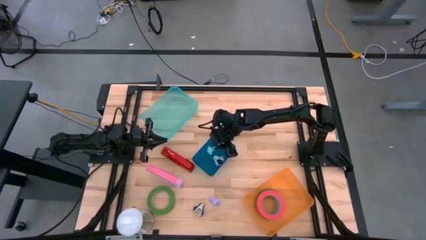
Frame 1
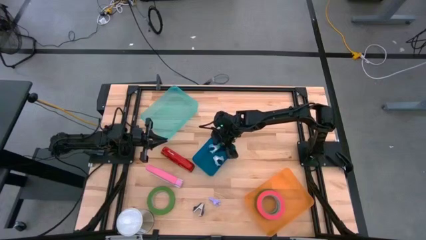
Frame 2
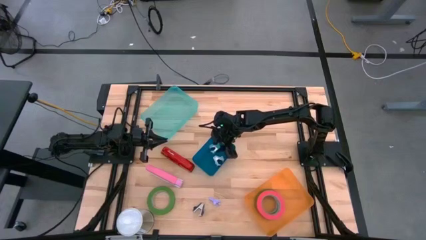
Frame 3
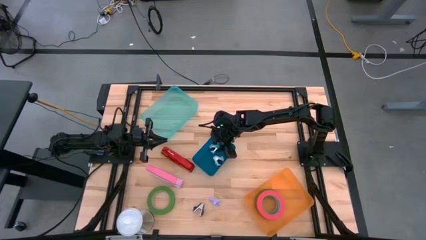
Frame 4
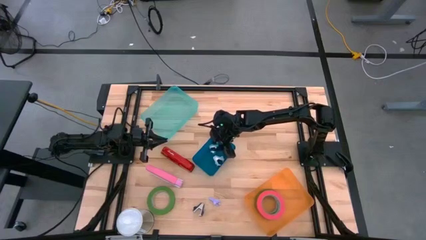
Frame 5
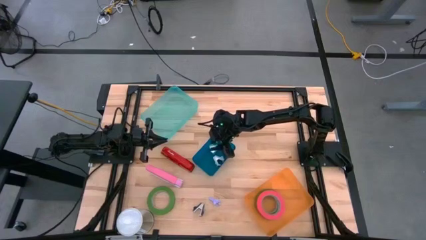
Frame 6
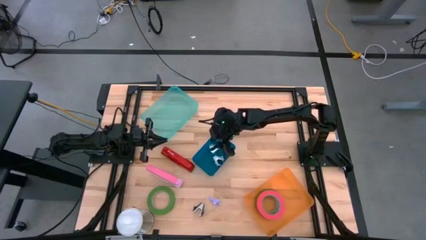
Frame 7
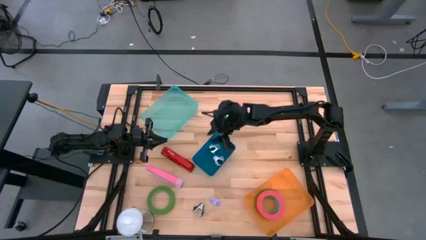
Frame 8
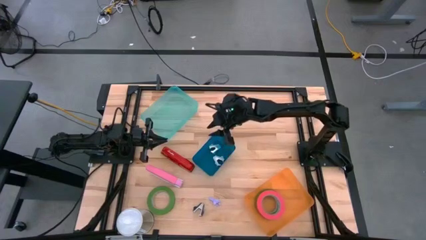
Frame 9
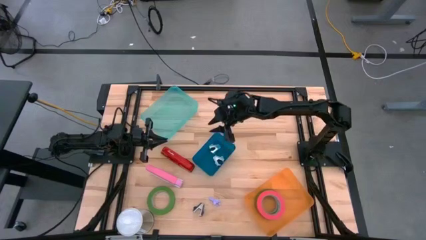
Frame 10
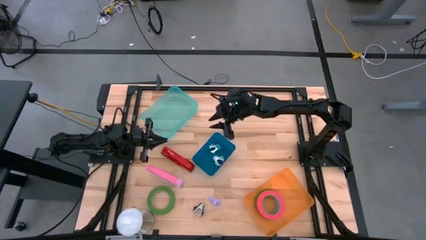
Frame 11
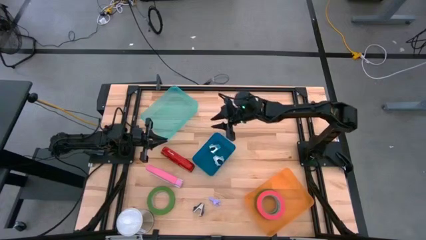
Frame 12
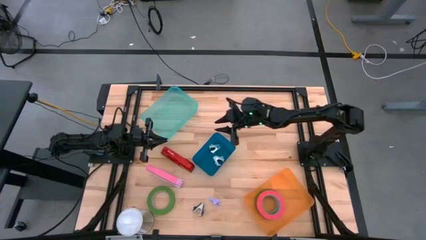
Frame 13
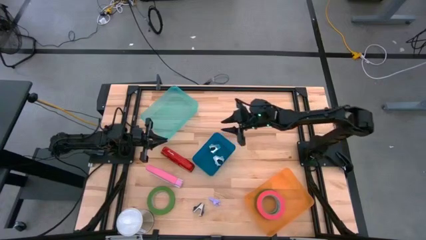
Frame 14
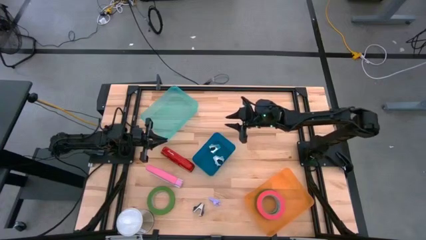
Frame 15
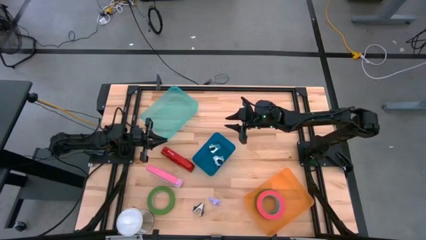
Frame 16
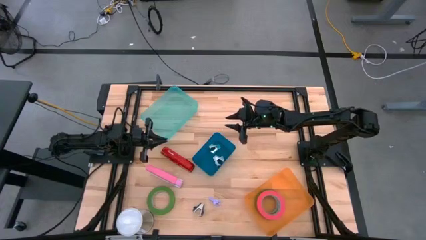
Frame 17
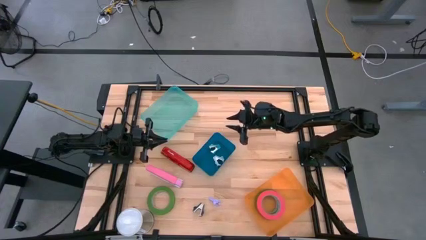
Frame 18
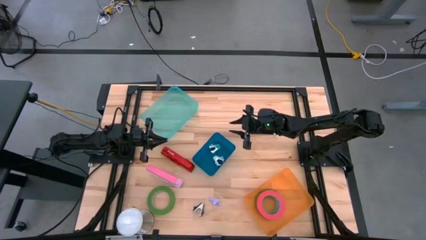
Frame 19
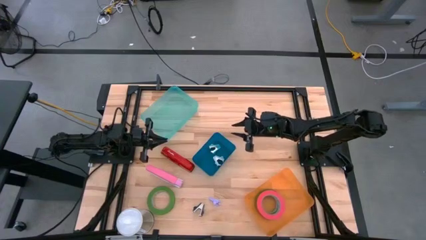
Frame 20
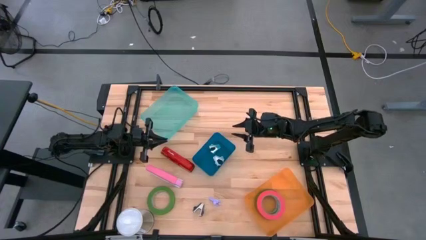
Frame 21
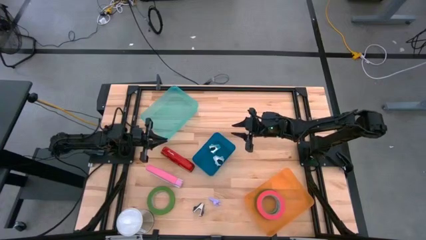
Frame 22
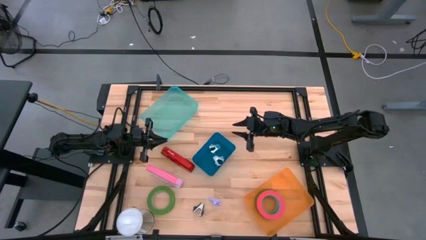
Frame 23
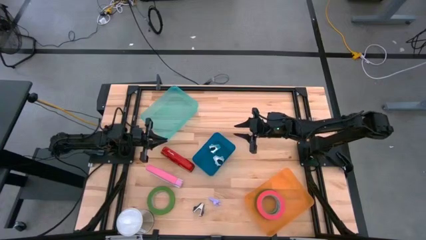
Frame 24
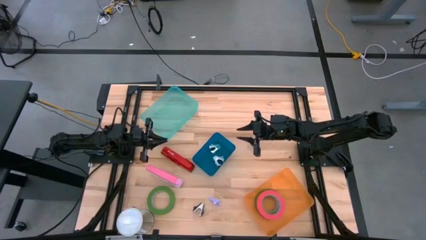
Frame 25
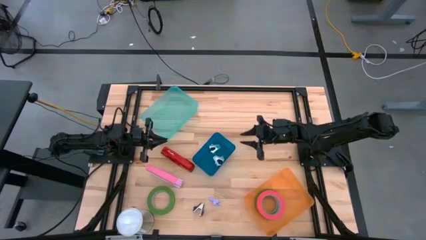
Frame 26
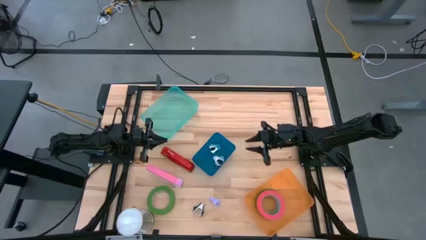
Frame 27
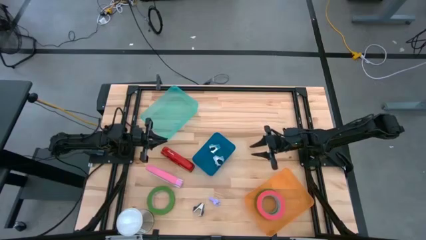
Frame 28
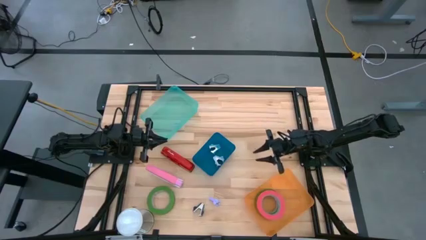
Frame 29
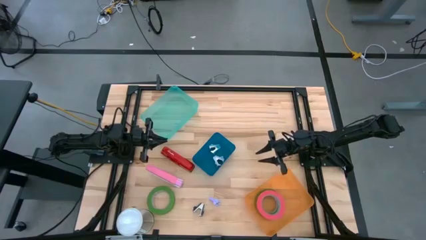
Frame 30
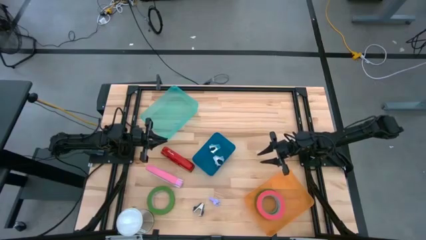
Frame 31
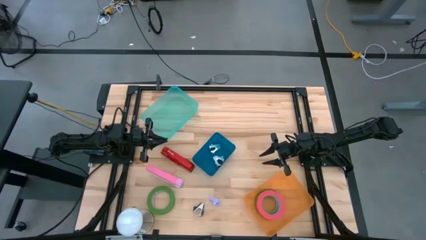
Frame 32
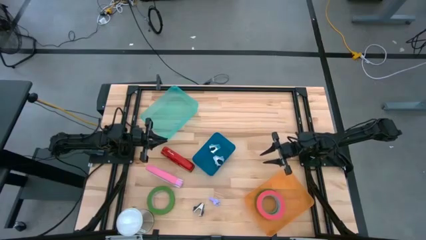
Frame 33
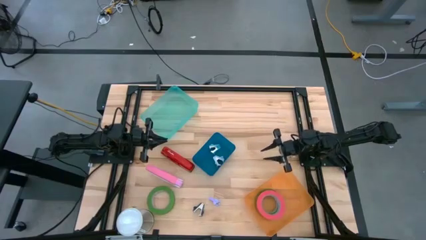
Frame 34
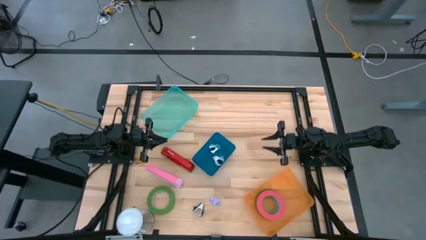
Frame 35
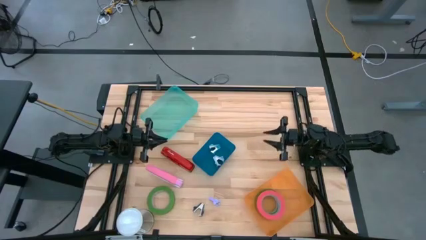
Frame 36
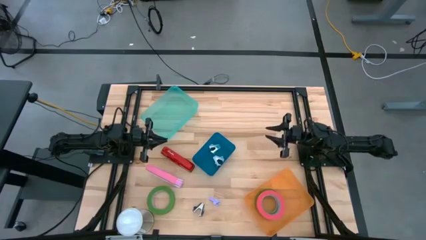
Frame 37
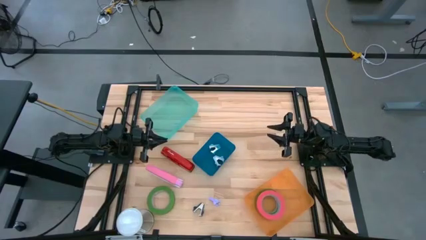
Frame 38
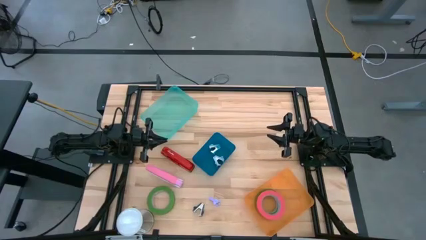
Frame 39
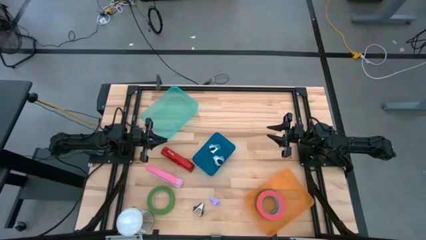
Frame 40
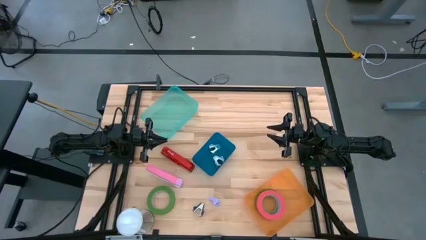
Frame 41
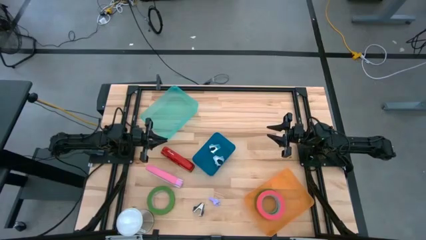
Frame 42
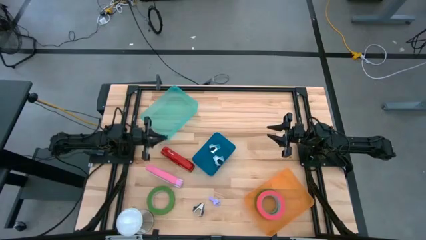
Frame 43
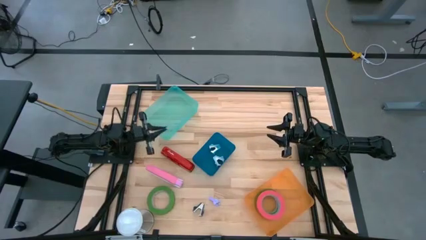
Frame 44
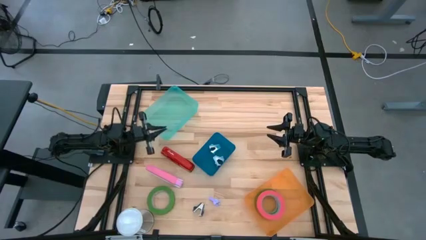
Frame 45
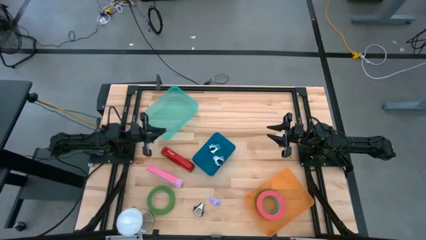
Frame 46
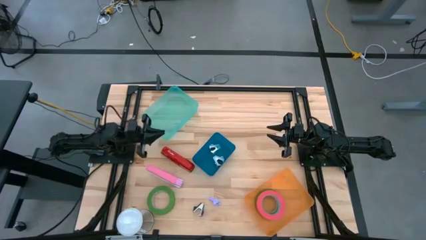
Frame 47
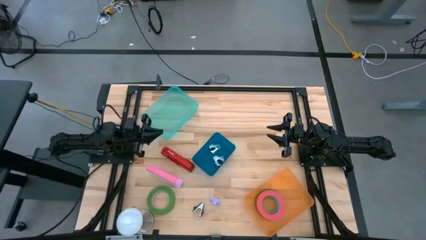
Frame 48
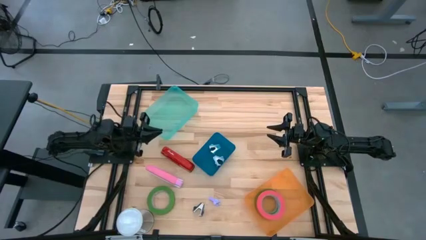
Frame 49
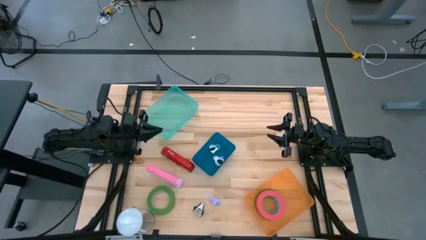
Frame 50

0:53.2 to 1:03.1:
Task: Pick and place Stapler, Stapler remover, tape
Put the red stapler into the green bin

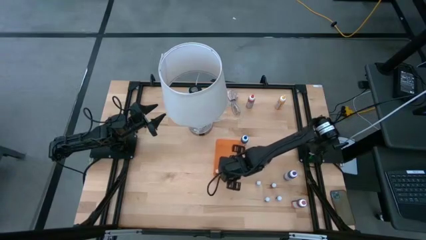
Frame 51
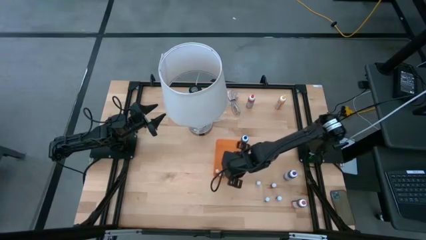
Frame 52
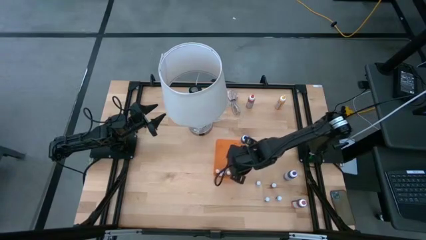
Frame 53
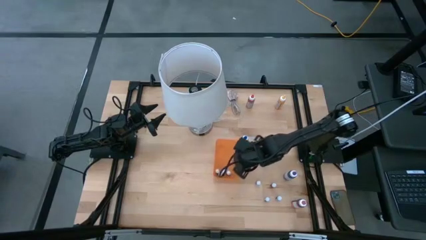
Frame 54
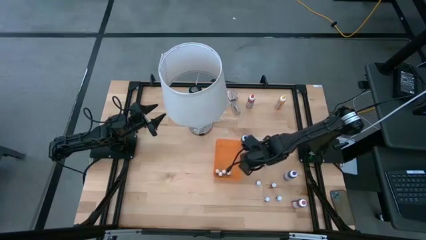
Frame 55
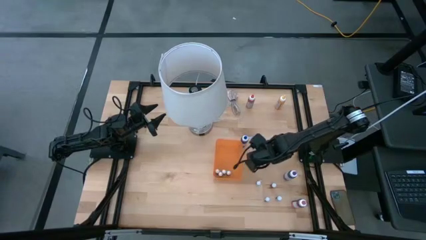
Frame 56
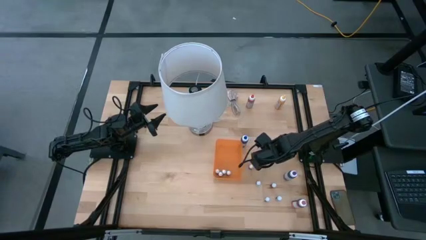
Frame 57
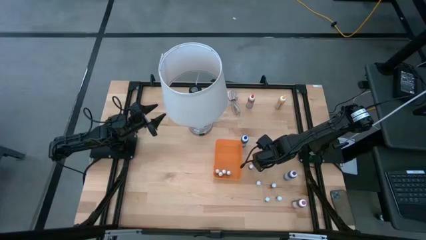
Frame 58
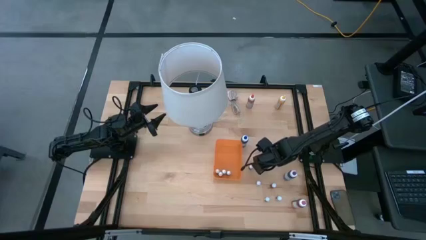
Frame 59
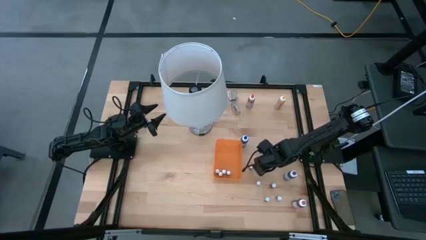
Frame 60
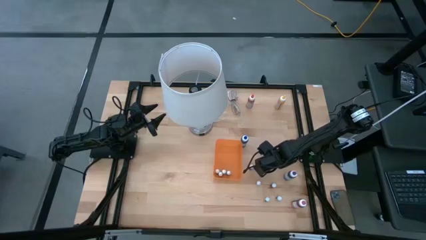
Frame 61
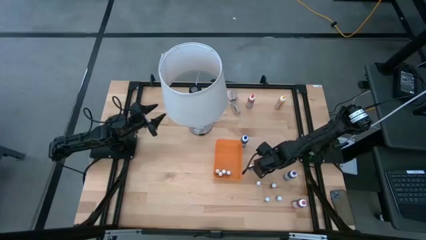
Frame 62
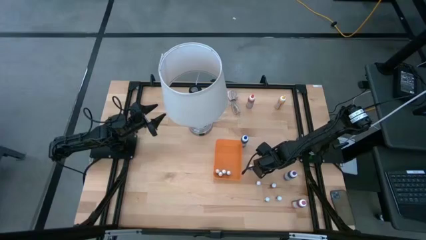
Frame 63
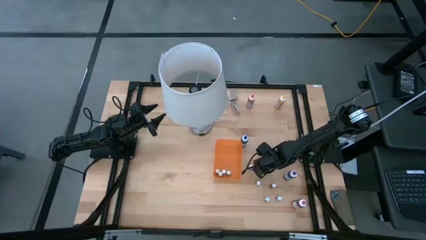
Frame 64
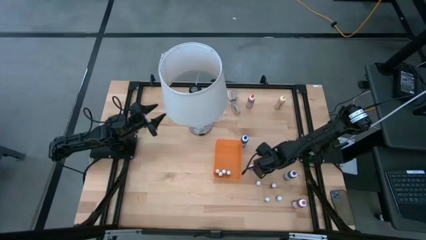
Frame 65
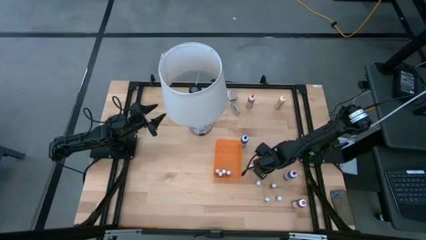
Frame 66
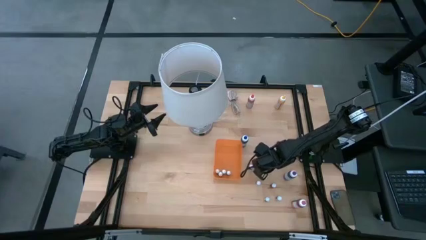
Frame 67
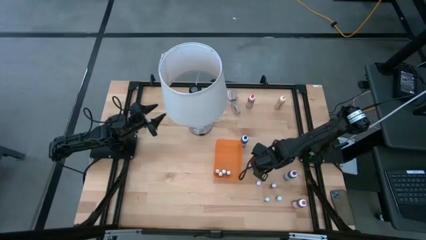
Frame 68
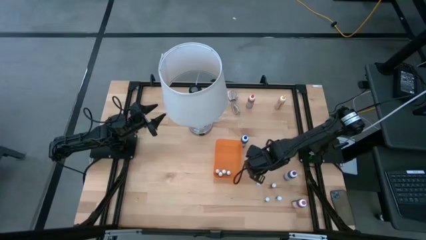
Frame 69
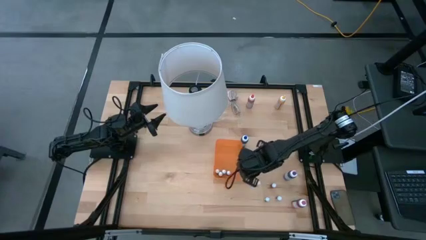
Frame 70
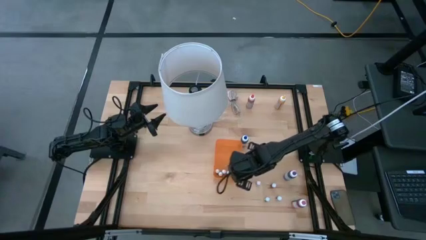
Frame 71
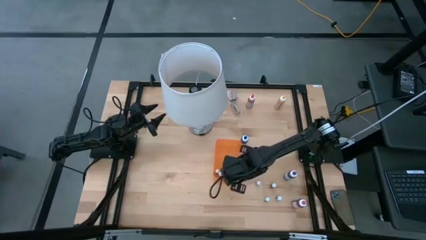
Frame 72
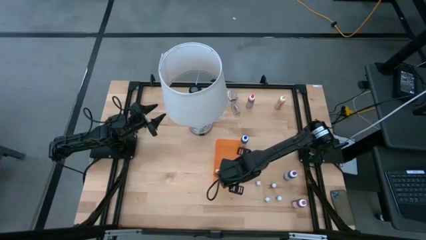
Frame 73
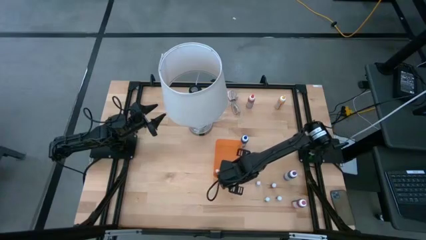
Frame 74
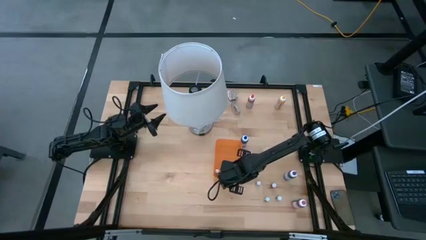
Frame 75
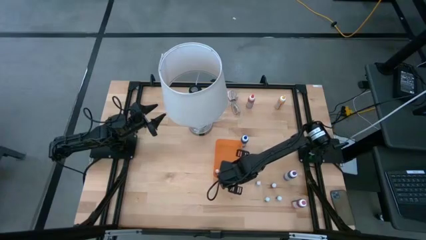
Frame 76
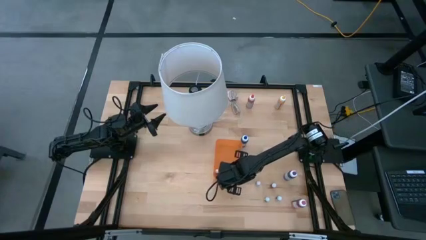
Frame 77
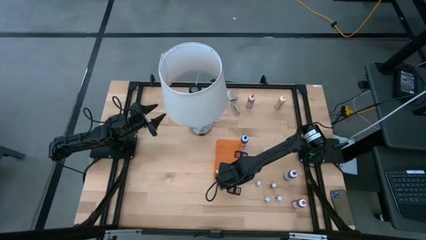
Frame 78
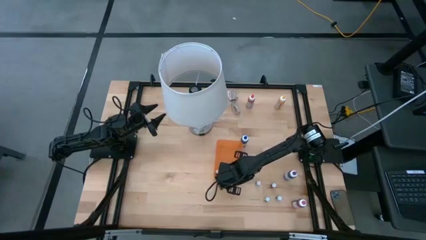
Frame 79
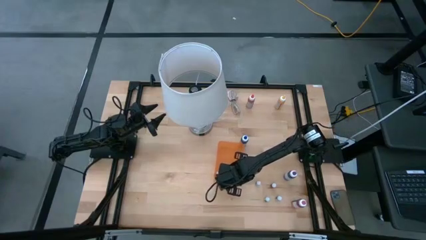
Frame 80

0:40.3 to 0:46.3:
Task: Pick & Place food coloring
Put the small black food coloring bottle into the orange bin
